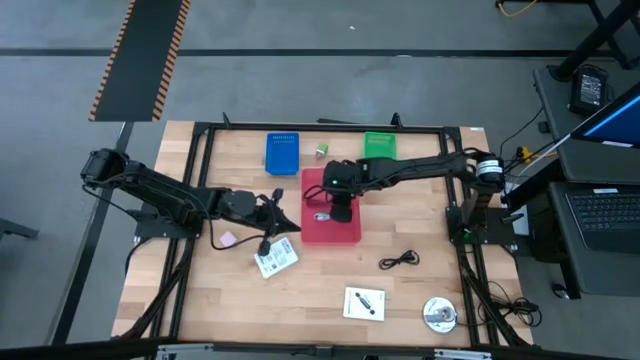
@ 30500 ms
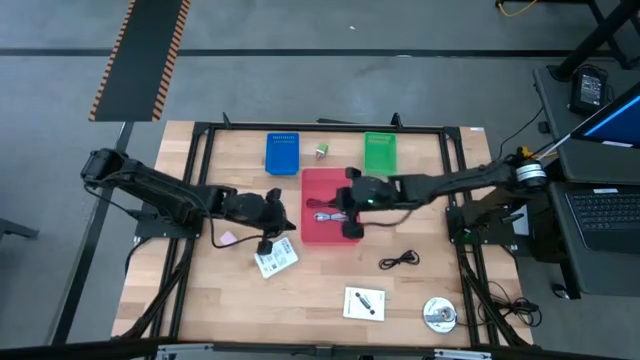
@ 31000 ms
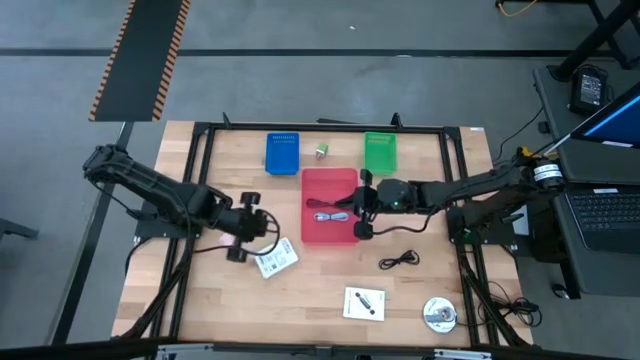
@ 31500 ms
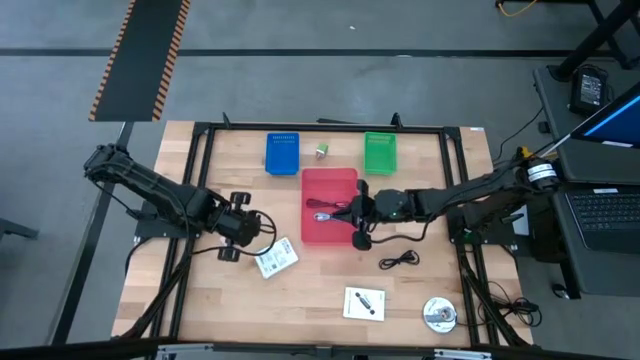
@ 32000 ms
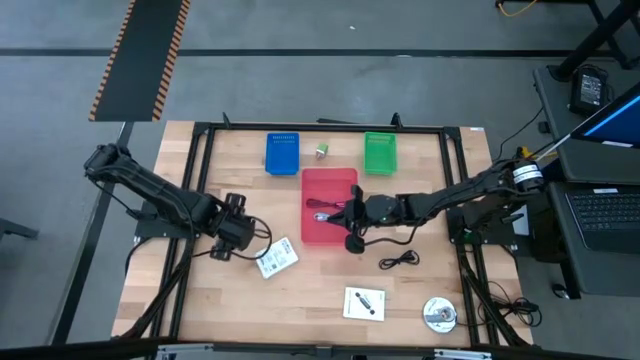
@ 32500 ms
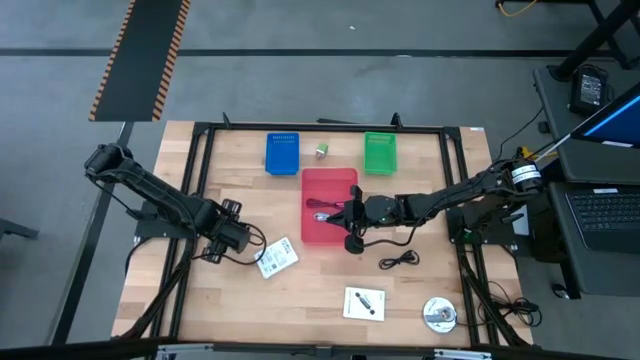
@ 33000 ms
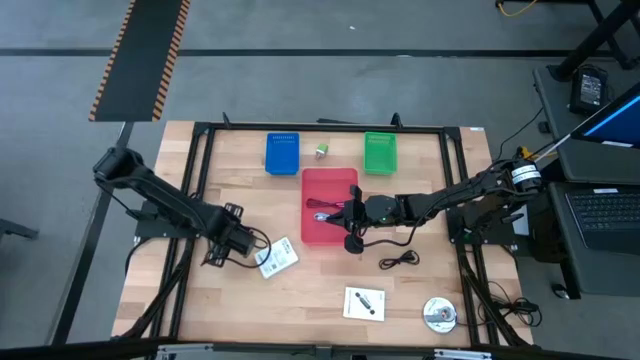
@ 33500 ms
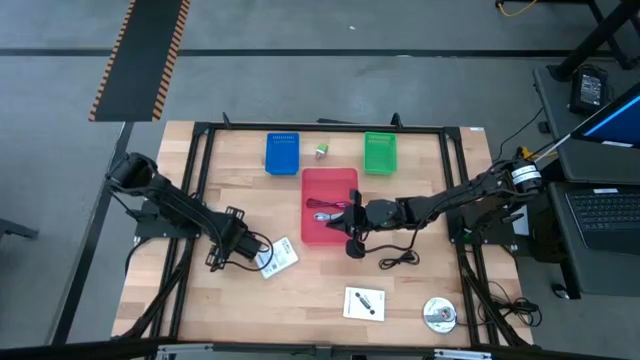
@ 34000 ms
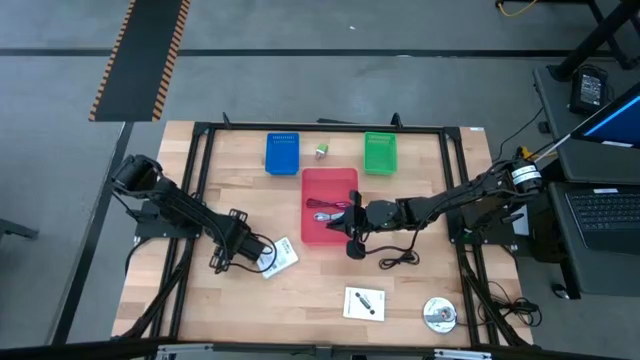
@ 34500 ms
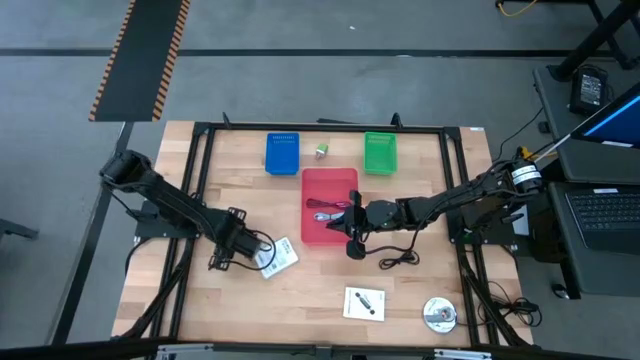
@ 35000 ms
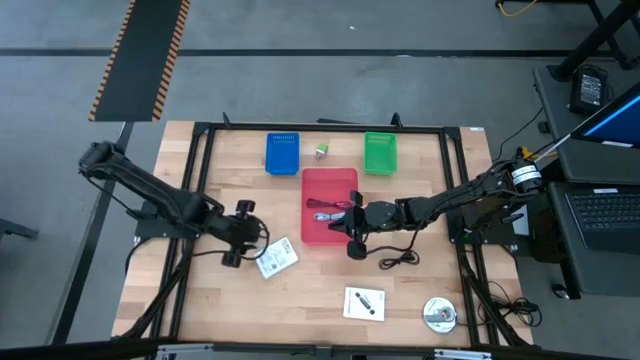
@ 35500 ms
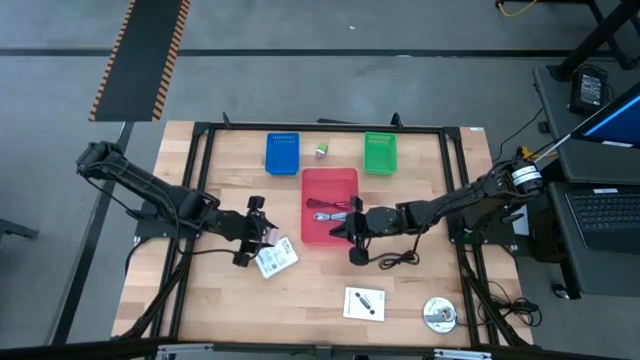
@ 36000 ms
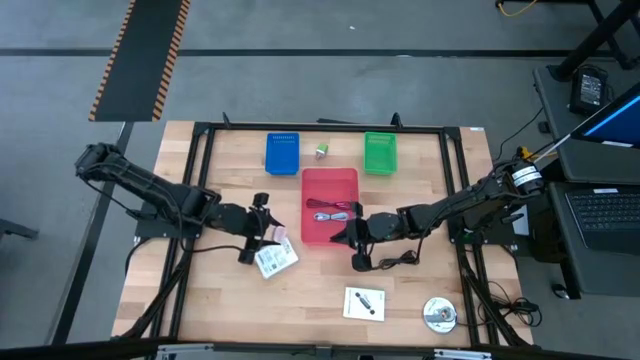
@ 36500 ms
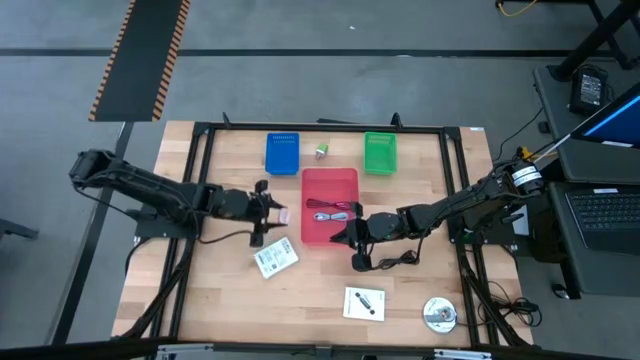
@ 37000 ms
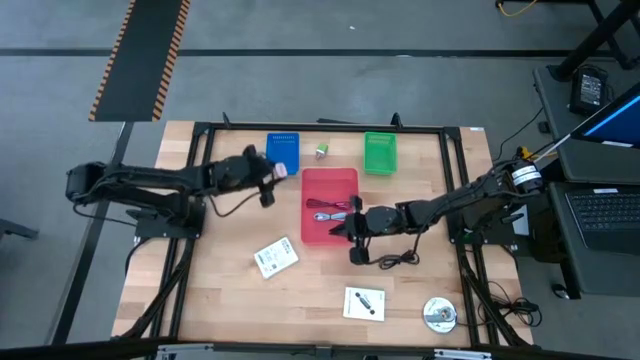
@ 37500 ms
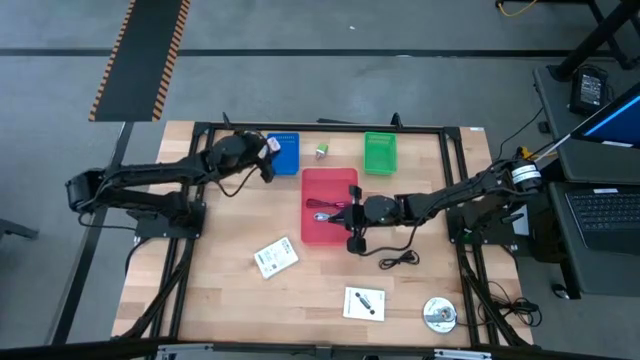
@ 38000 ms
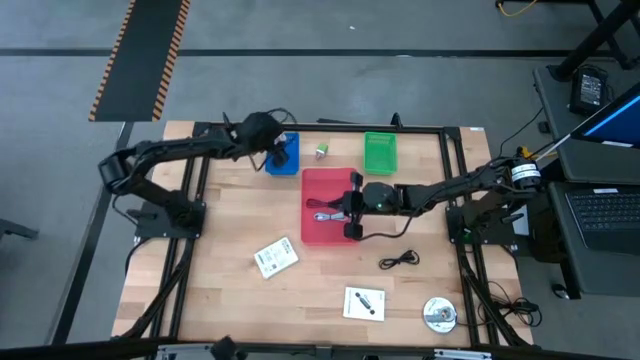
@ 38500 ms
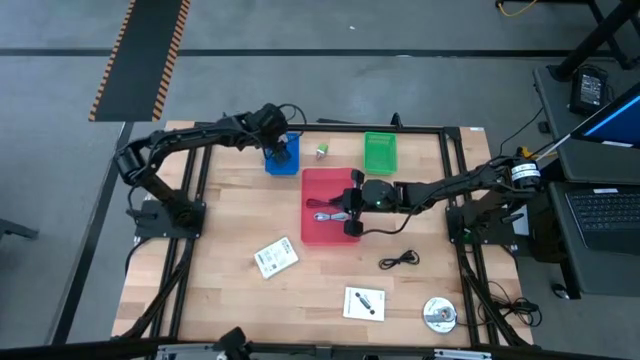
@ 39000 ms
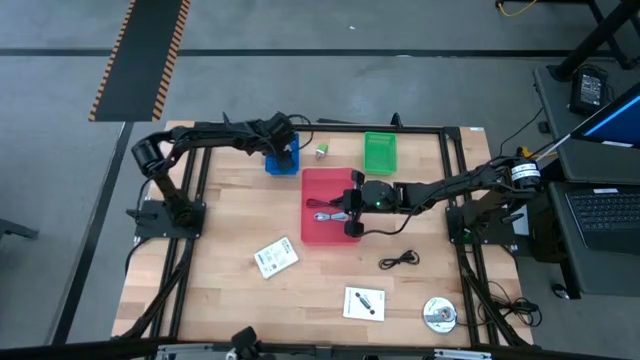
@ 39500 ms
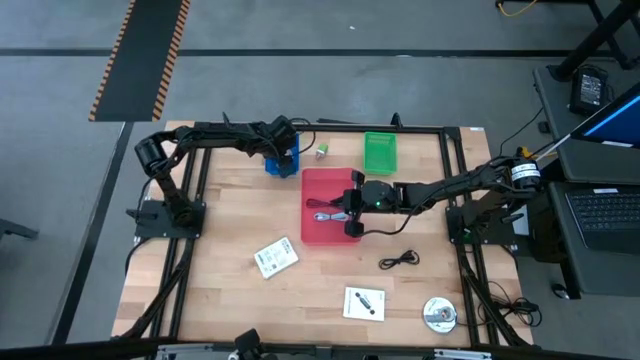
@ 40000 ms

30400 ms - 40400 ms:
Task: Pick and place items into bin
Put the white charger adapter into the blue bin

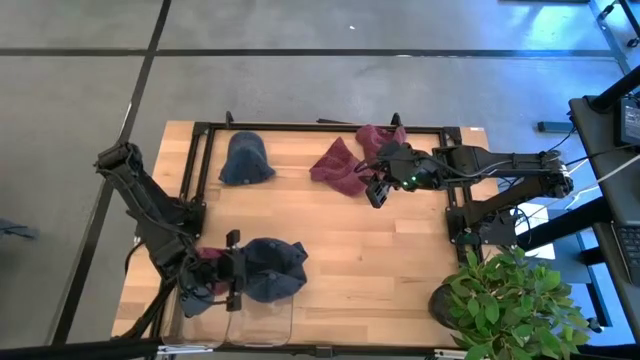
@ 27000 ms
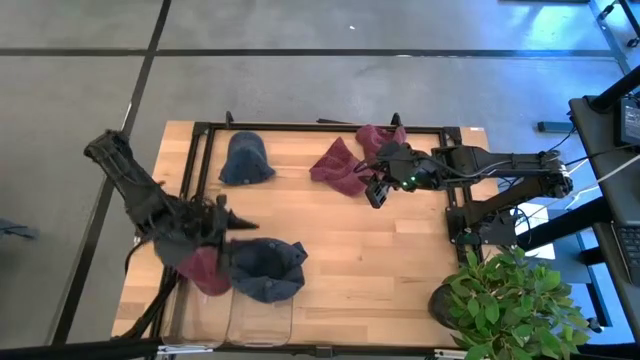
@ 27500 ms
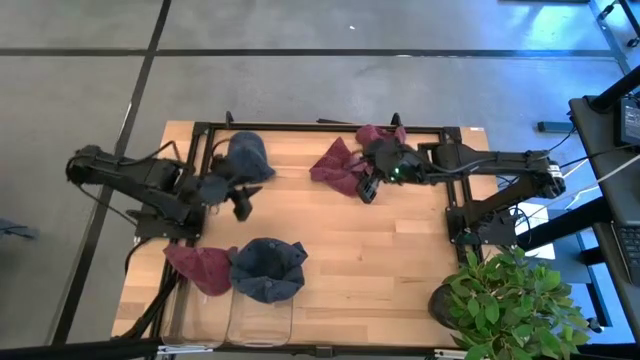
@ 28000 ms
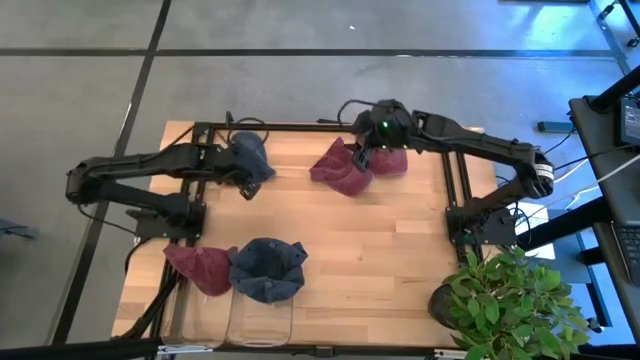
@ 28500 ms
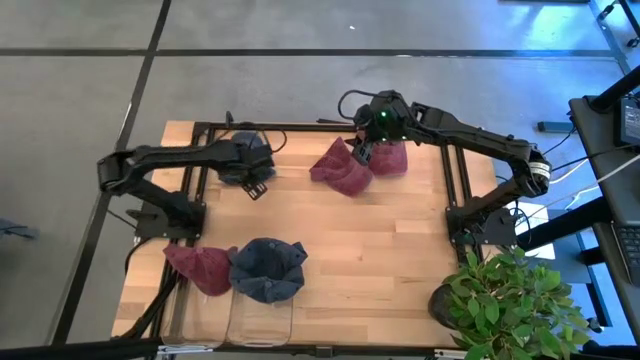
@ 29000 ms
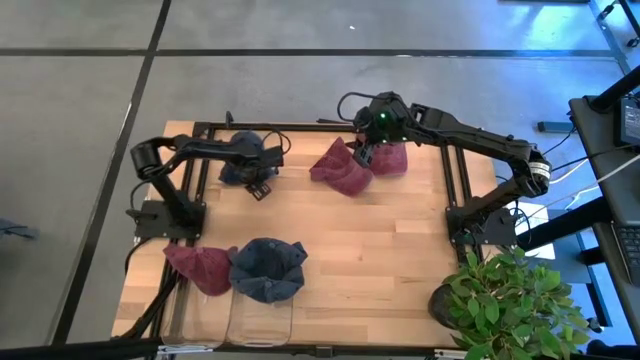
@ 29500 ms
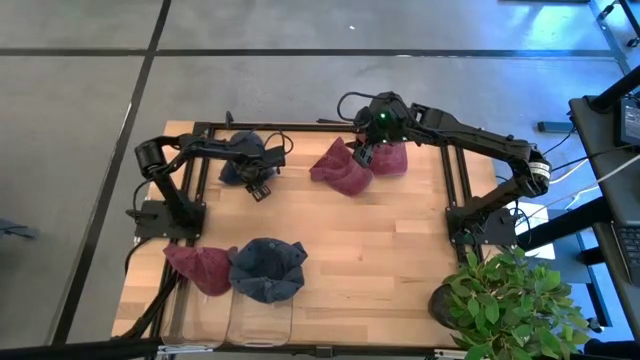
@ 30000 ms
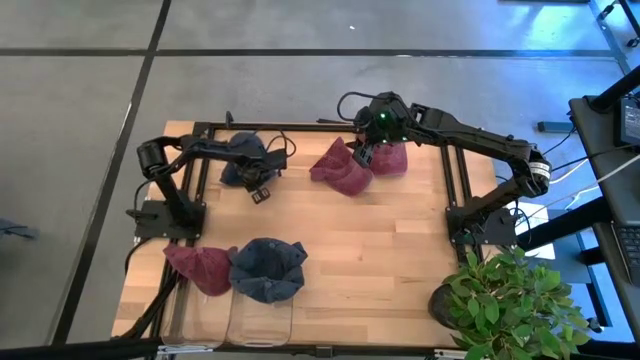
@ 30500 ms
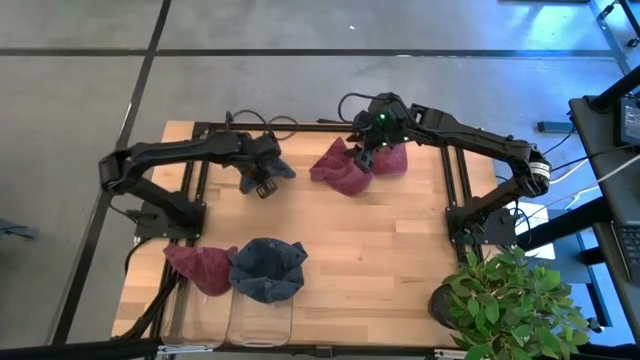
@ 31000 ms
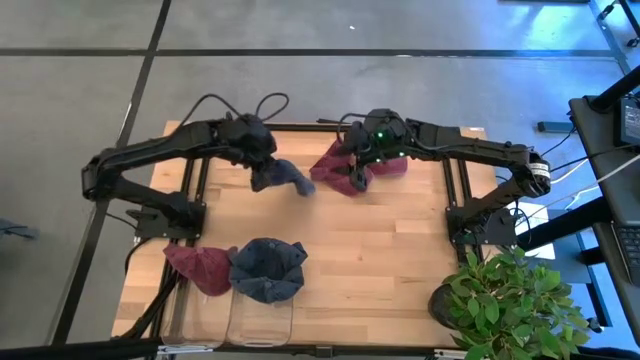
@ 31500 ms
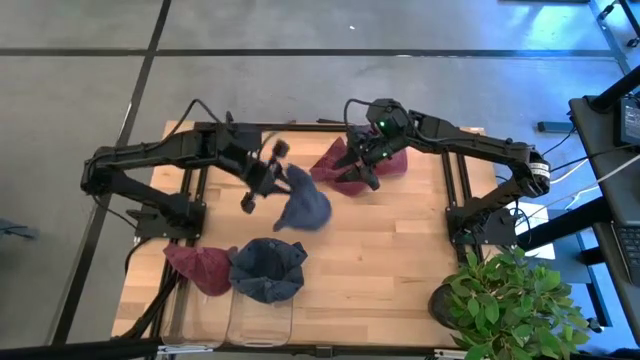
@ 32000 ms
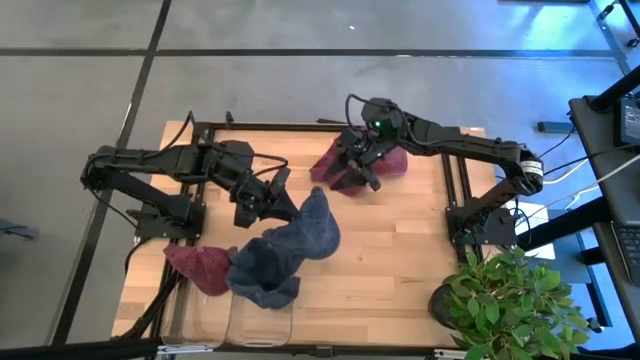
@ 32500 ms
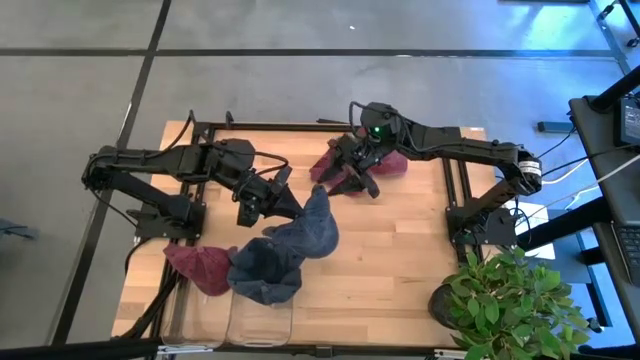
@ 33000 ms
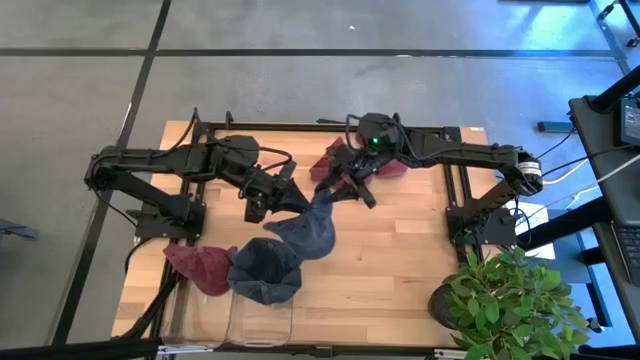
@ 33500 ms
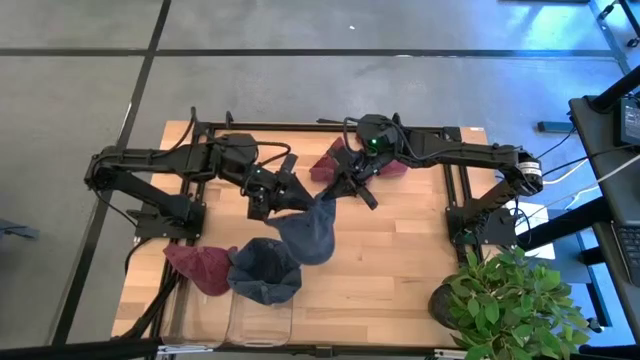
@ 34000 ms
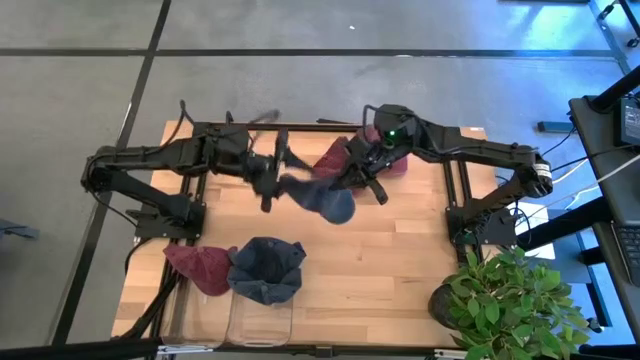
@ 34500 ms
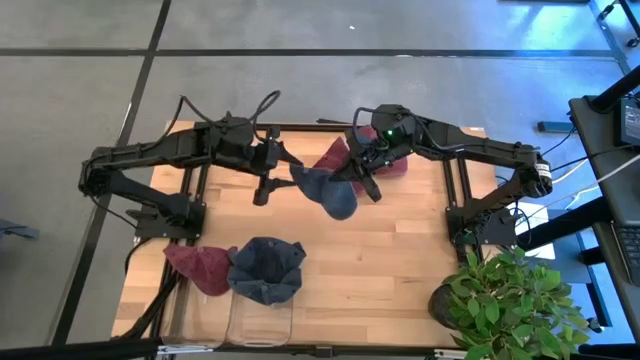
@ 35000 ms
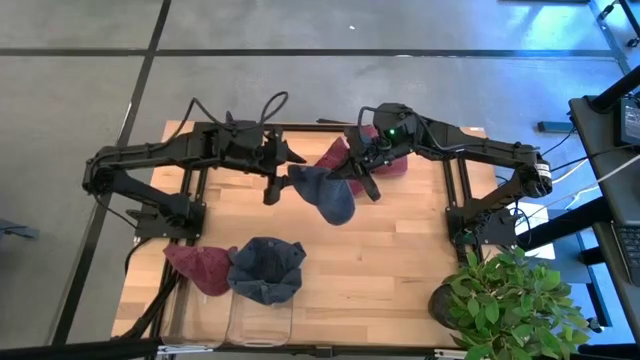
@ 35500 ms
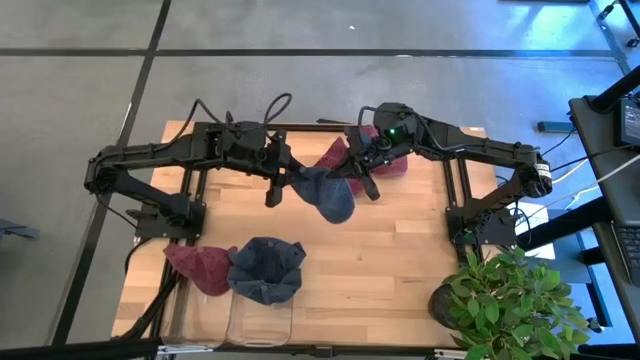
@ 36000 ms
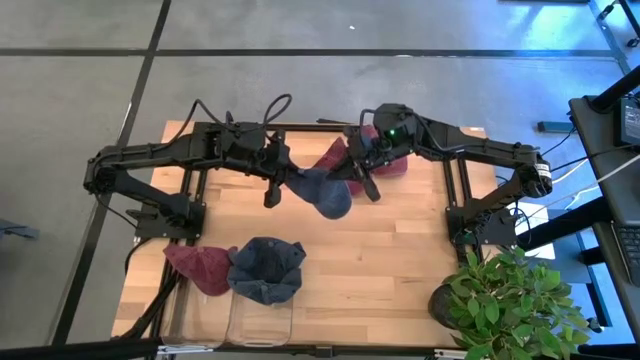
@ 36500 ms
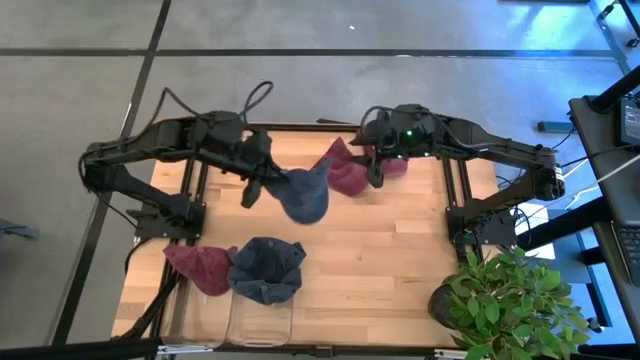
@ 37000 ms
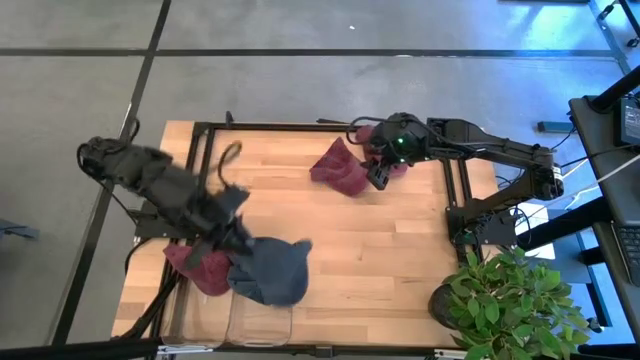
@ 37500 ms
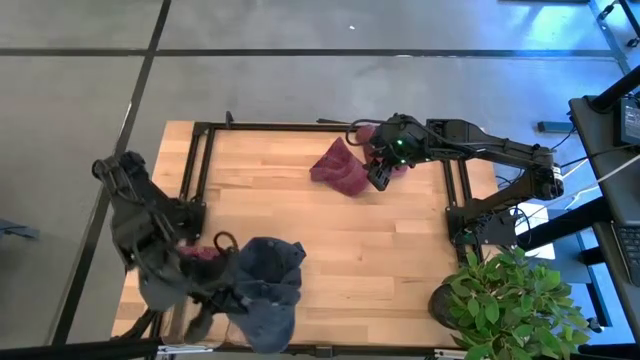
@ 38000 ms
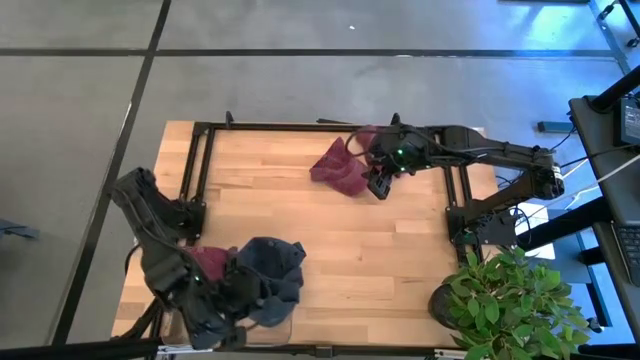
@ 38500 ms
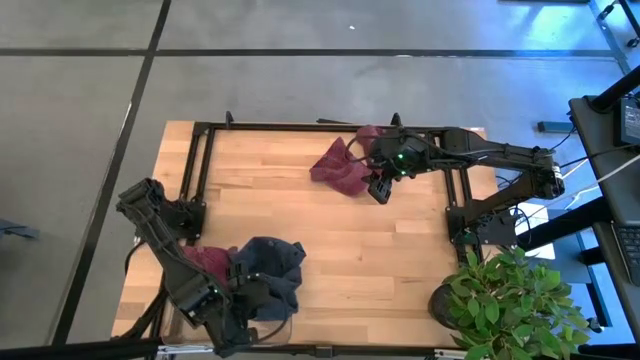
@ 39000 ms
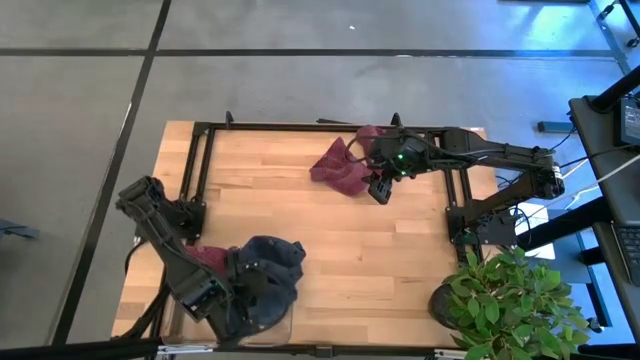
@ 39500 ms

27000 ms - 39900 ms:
Task: Pick & Place hat
Put the blue cap into the right transparent bin
